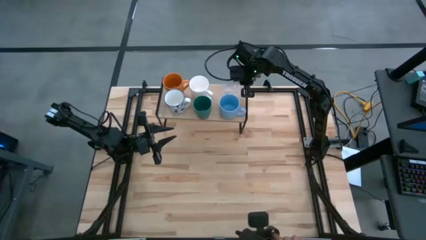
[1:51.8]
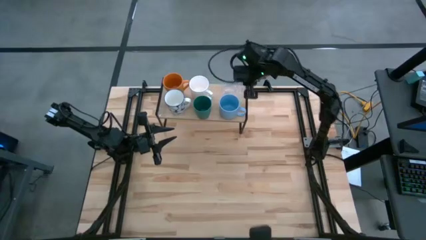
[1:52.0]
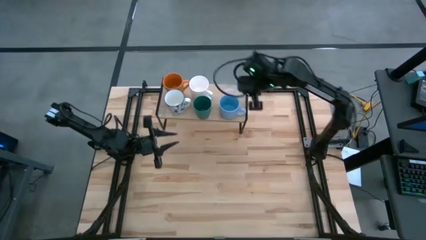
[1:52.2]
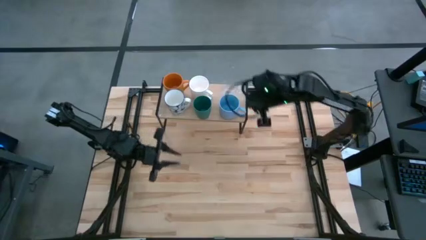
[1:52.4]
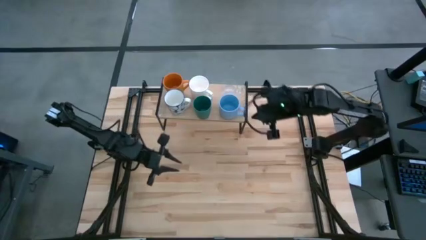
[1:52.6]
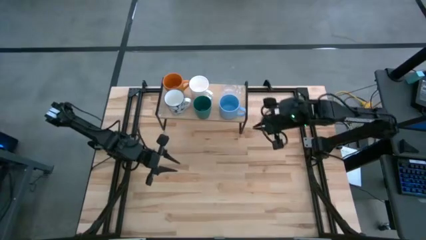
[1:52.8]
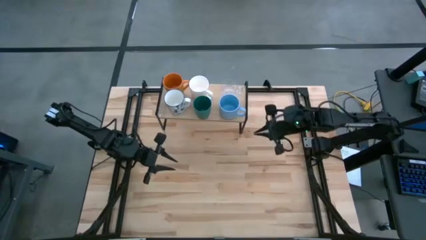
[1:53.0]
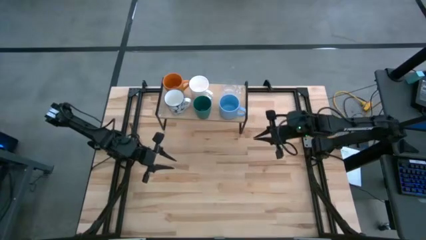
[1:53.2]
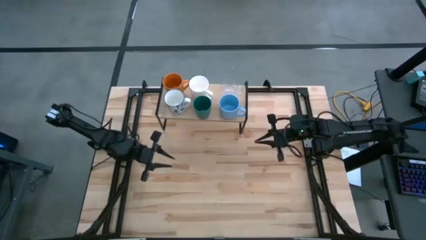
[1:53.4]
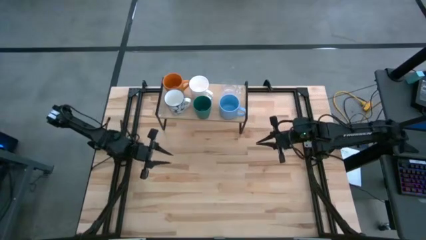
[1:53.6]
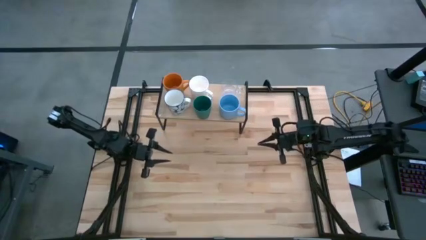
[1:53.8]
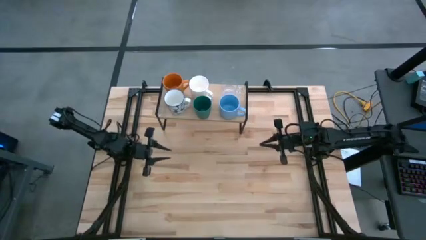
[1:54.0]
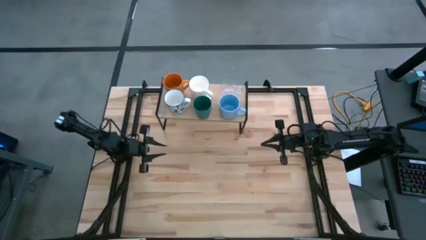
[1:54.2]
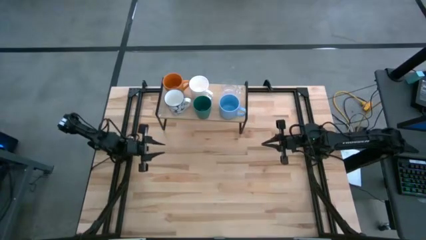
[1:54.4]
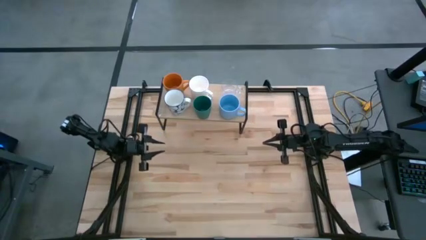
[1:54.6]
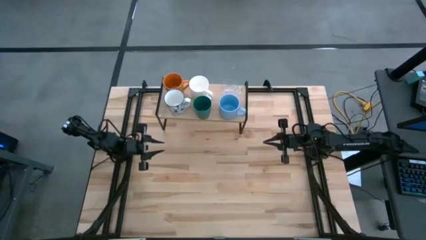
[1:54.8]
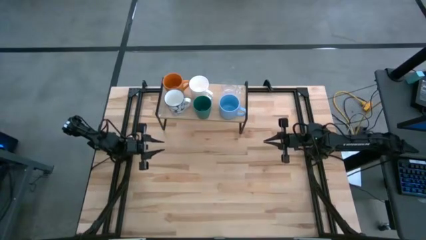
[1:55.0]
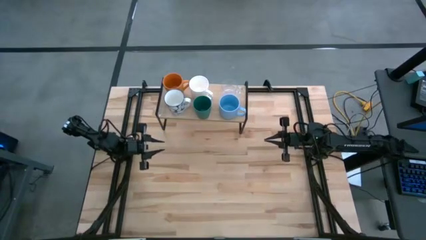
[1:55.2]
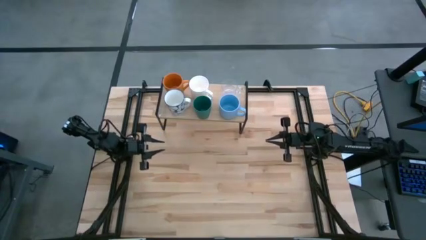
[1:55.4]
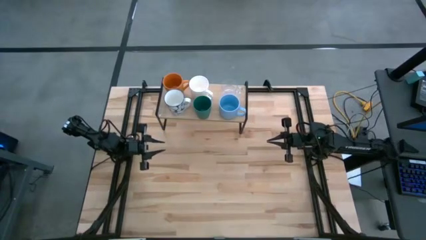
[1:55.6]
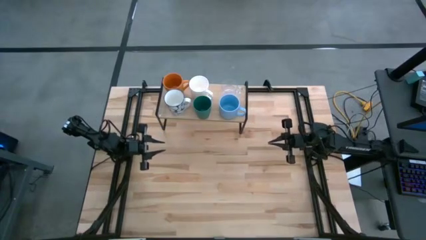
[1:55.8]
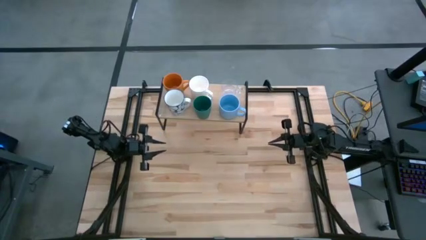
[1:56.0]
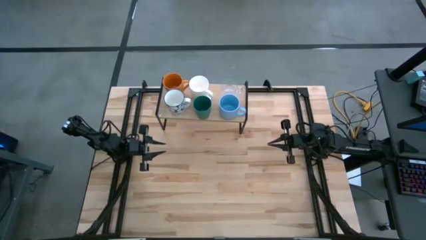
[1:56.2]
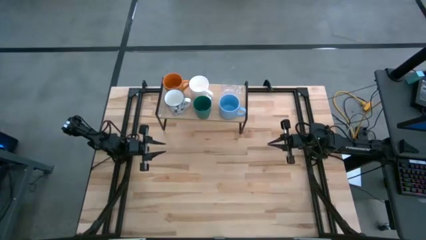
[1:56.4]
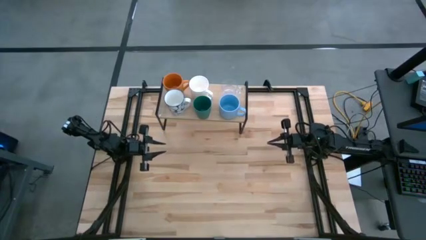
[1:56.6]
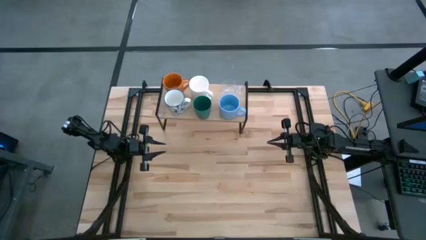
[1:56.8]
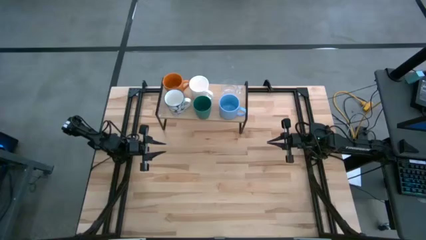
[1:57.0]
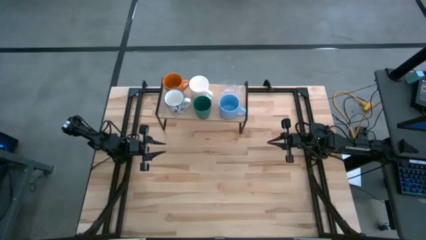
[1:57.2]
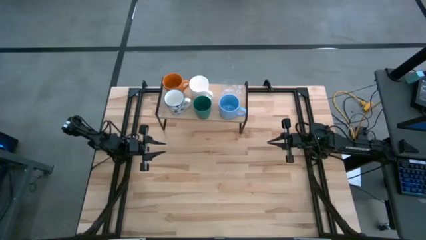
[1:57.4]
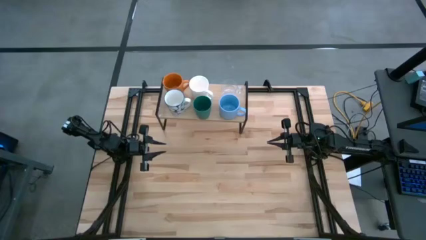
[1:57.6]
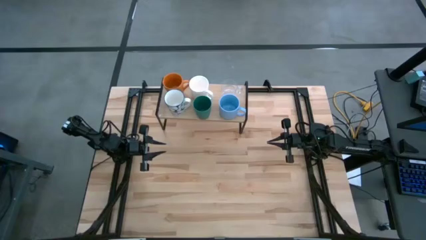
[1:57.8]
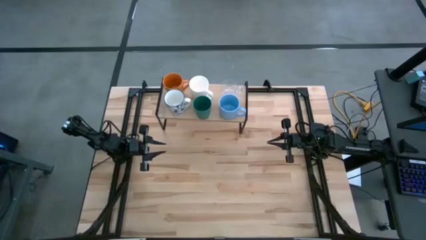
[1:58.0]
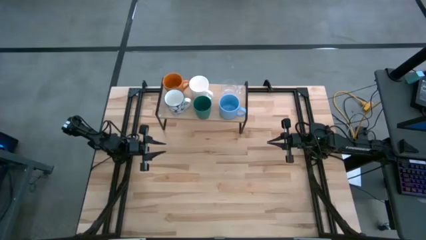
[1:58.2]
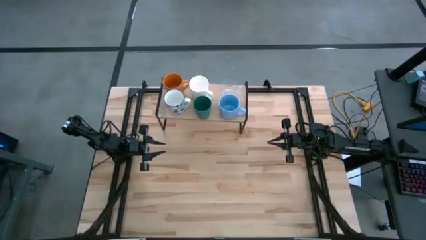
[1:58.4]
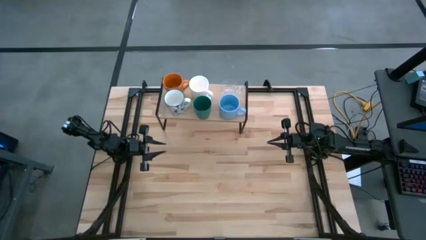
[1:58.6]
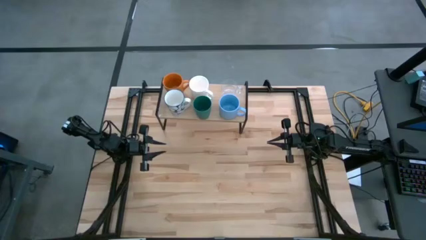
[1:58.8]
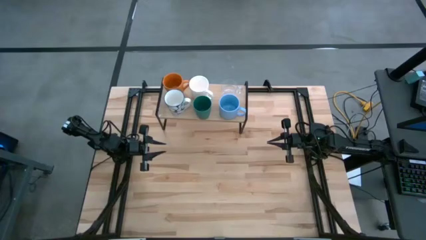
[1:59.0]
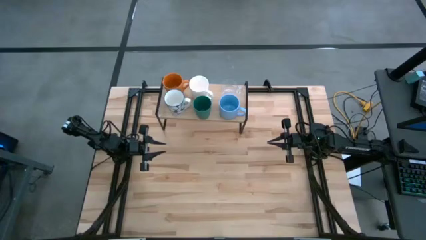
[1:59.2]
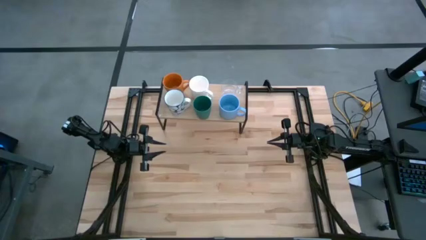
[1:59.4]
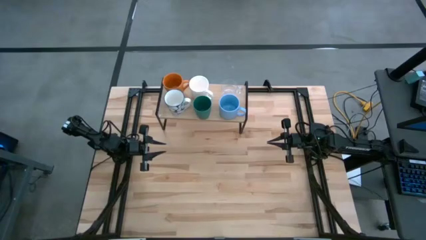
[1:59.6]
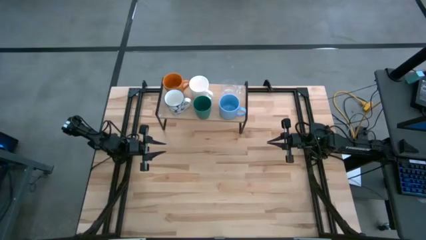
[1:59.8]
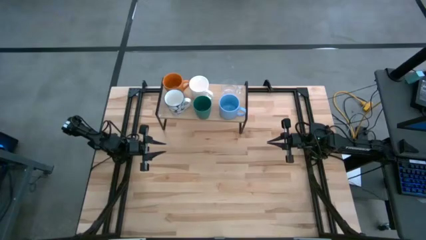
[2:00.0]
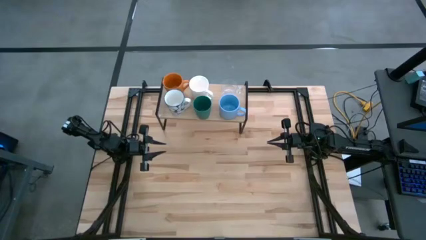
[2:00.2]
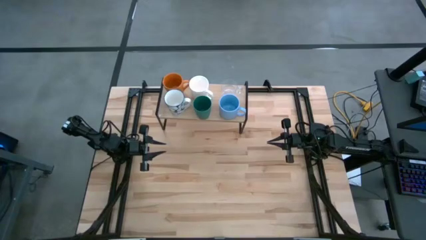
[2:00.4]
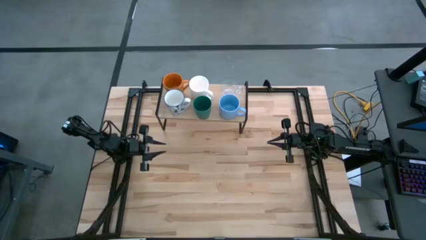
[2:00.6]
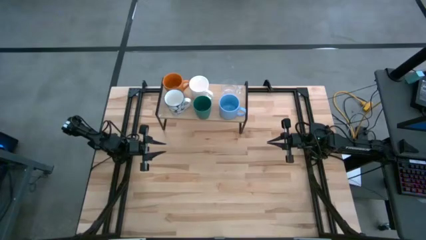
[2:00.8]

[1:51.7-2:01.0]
Task: Stack small to large cups/mugs on shelf
Return to Home Position

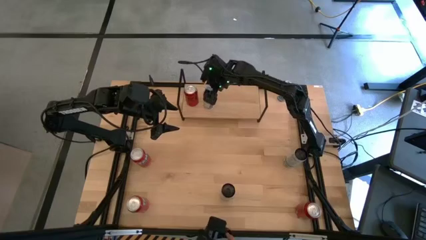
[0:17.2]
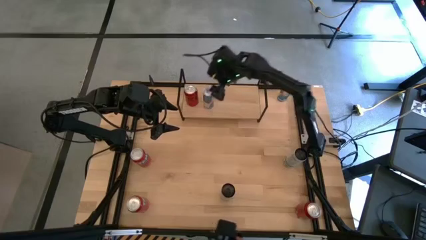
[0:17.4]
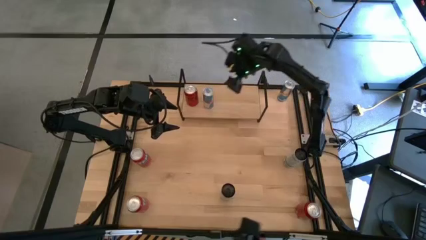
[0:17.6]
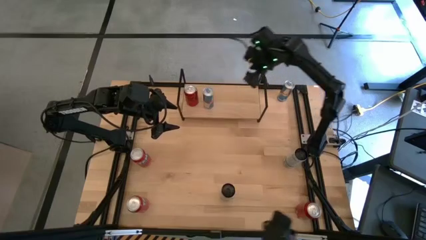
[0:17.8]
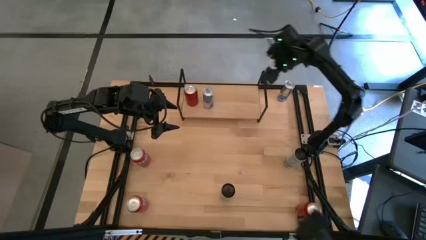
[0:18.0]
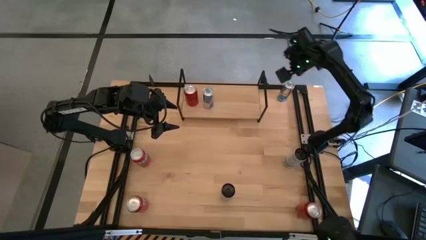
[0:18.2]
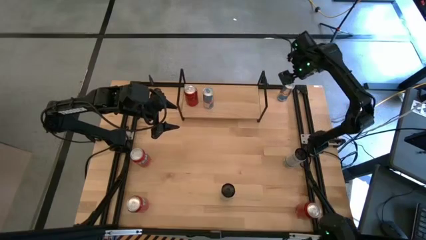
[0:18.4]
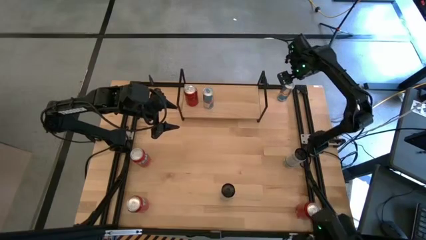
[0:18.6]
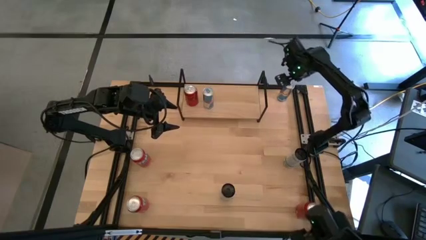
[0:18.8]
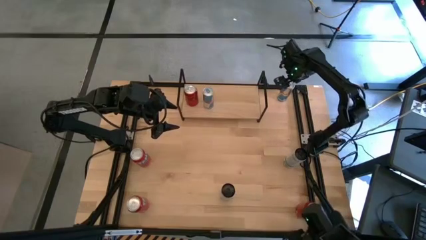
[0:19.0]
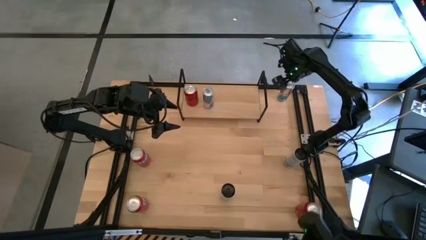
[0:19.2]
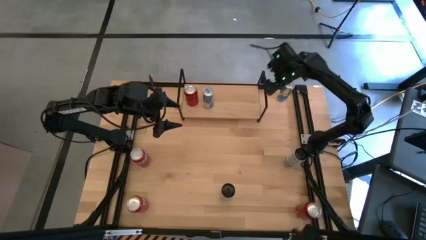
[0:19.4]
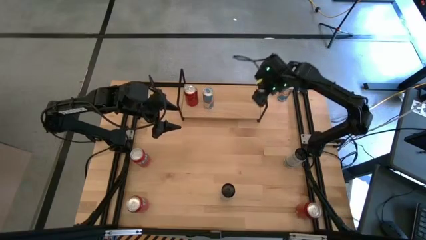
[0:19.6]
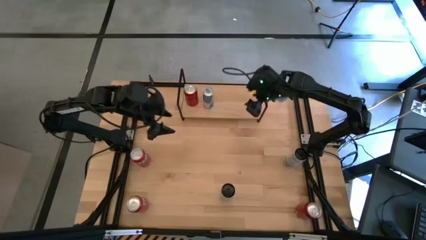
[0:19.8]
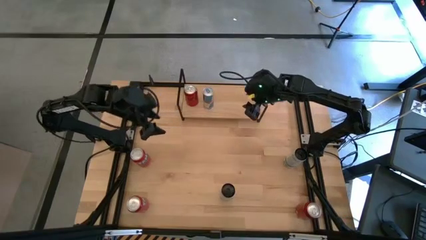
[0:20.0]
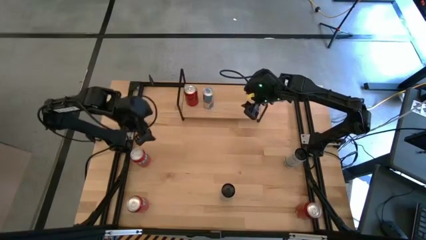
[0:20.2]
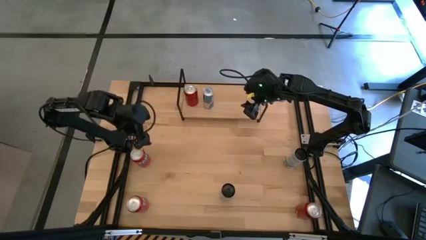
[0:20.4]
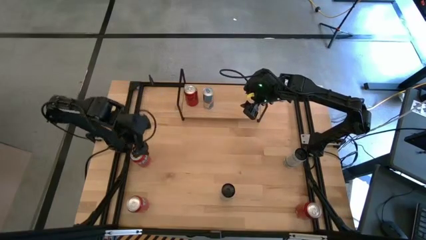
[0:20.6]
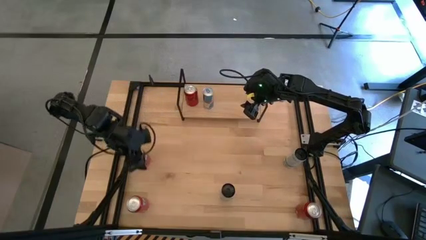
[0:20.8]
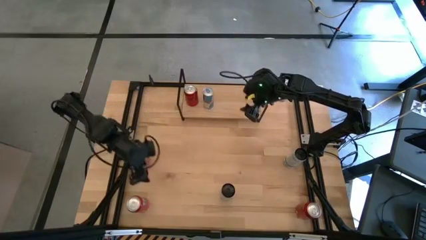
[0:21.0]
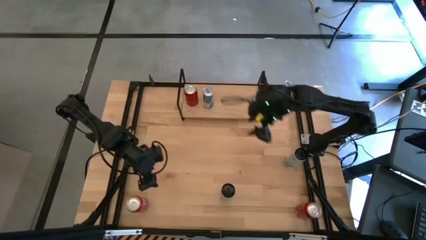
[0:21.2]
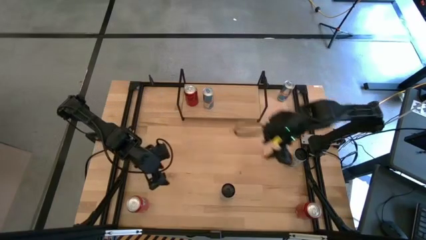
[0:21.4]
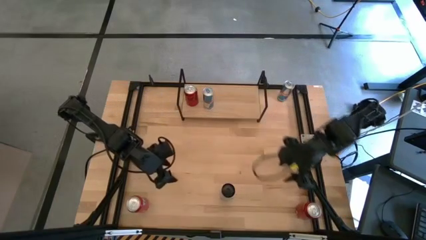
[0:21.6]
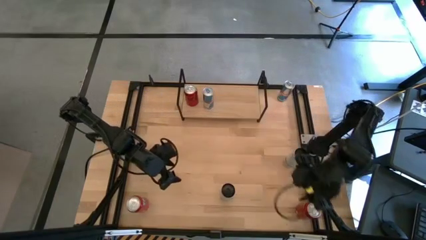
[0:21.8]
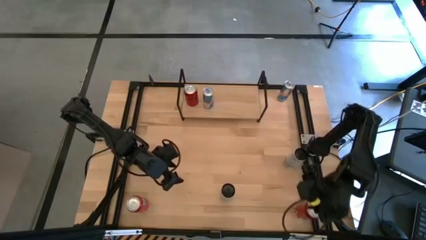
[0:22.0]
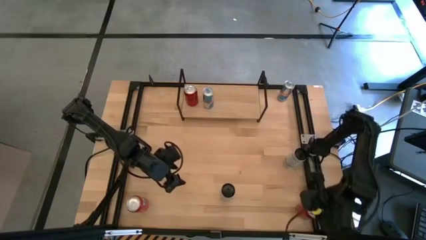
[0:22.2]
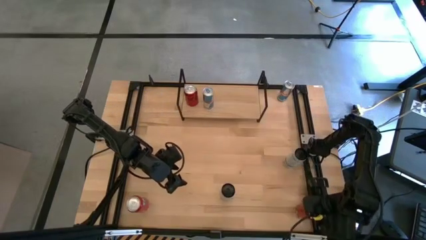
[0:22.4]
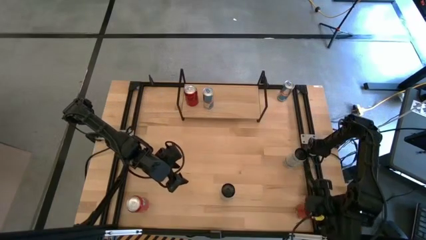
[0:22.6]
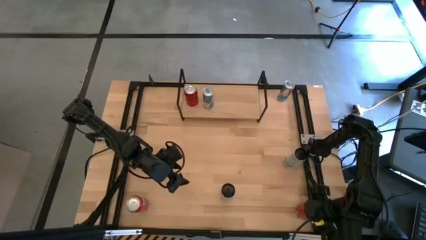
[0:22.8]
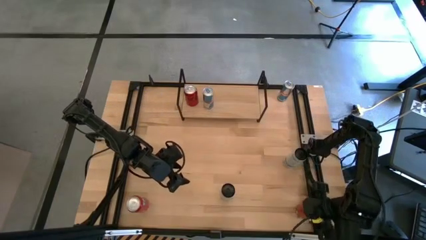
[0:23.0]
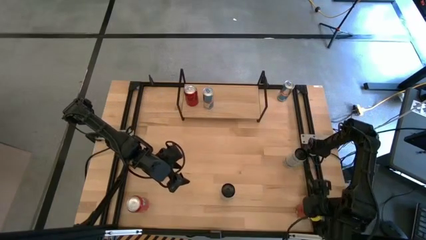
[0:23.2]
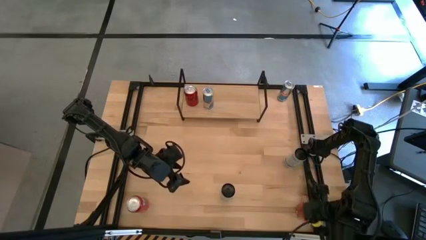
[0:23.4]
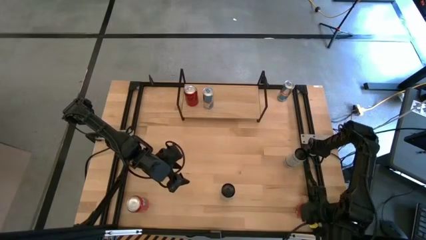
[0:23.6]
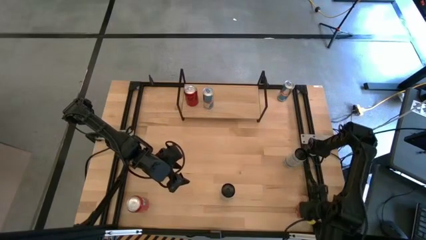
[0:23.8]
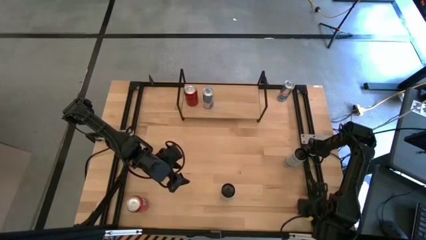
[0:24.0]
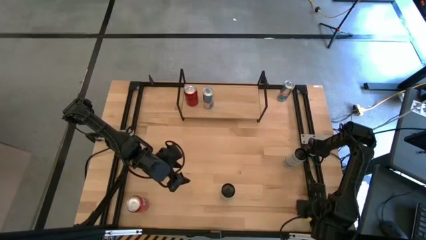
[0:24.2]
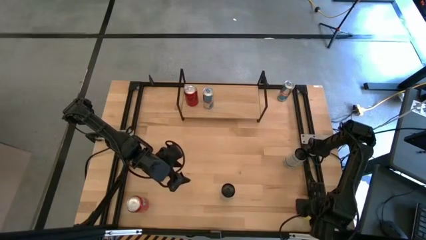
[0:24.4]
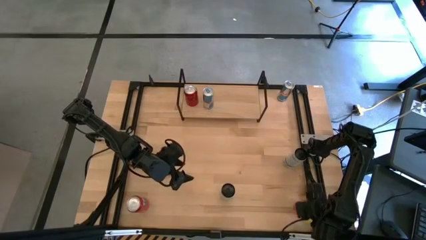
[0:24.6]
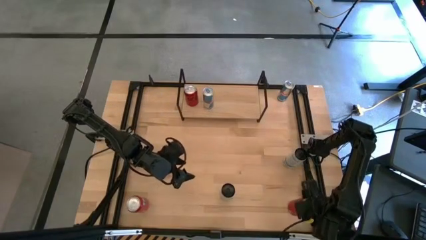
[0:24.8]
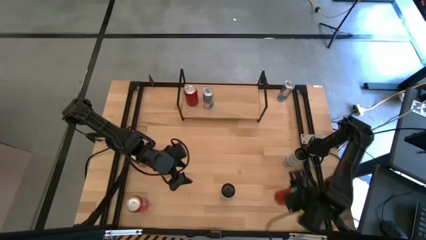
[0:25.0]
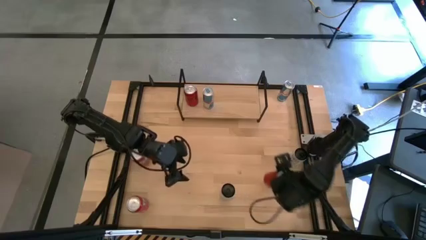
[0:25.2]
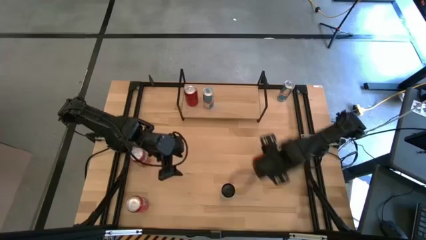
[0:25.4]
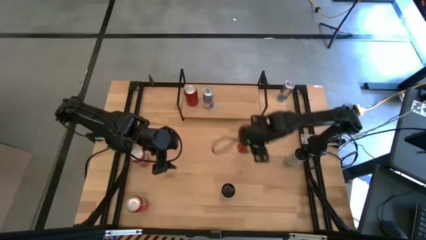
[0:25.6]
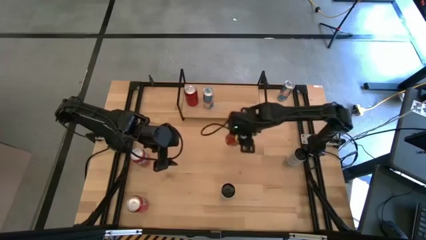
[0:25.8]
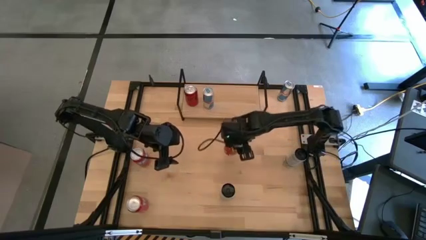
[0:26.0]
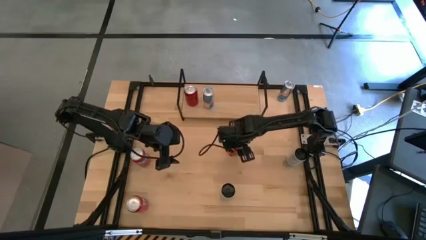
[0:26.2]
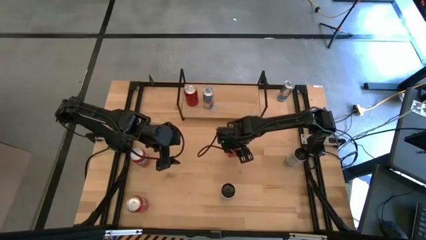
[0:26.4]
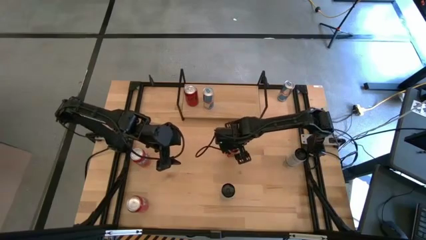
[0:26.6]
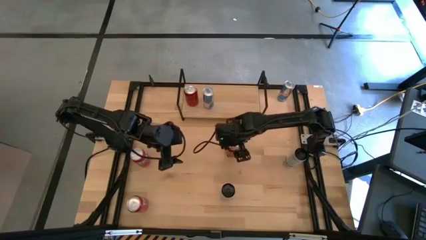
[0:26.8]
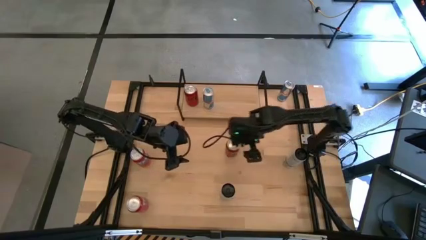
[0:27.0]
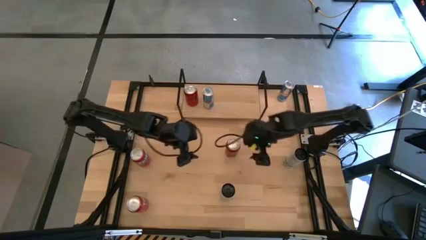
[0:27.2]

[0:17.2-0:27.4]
Task: Place canned beverage on shelf
Put the red black soda can on the shelf aligned with the other red black soda can
